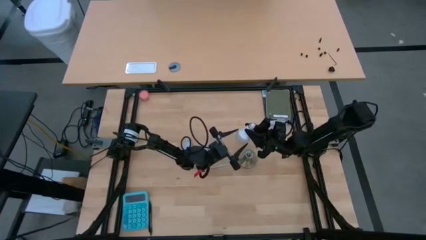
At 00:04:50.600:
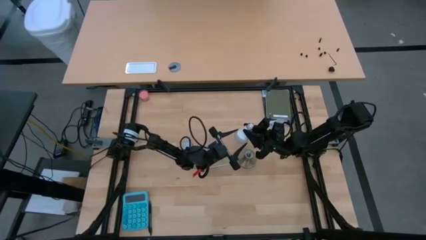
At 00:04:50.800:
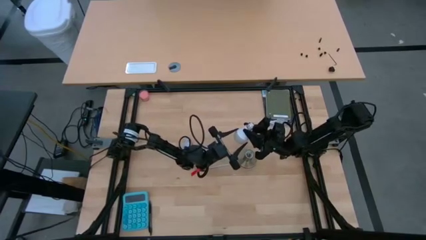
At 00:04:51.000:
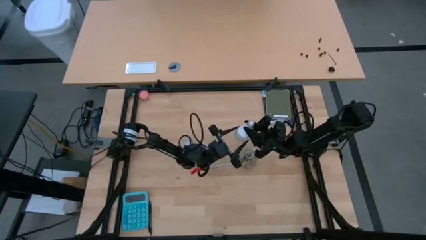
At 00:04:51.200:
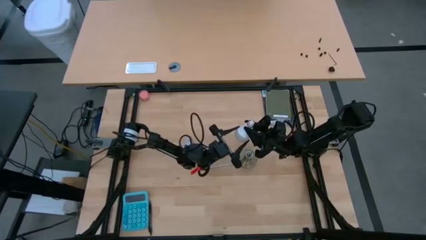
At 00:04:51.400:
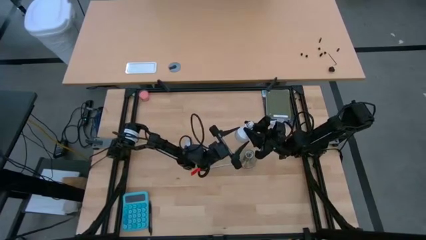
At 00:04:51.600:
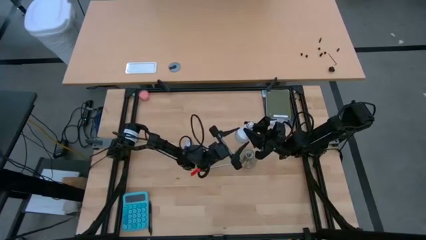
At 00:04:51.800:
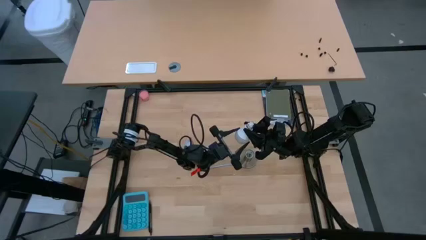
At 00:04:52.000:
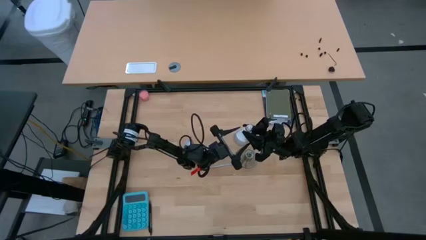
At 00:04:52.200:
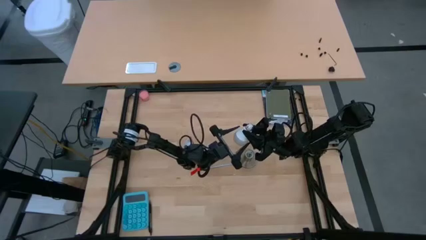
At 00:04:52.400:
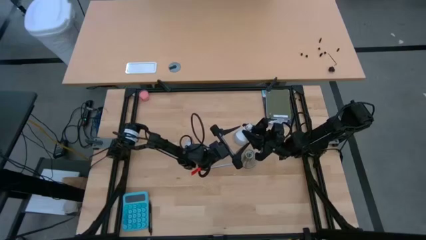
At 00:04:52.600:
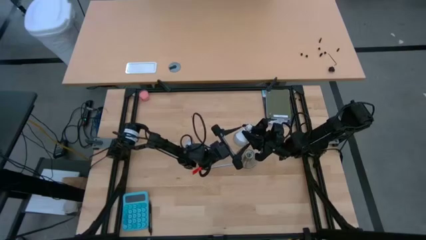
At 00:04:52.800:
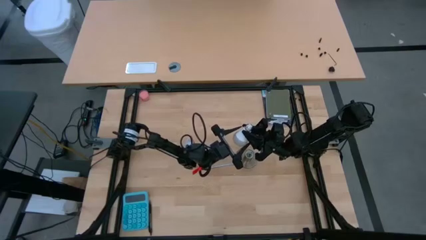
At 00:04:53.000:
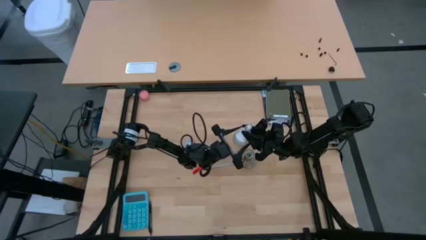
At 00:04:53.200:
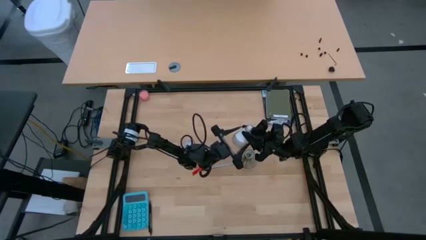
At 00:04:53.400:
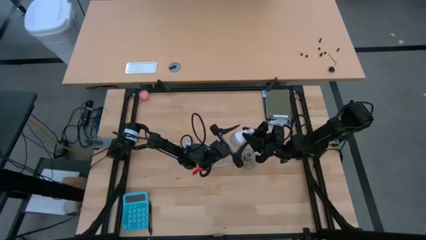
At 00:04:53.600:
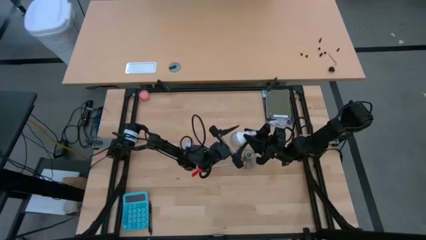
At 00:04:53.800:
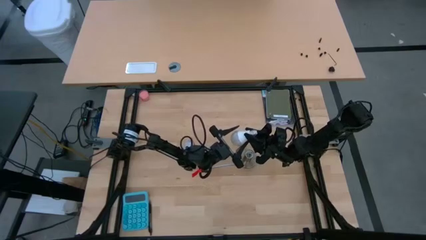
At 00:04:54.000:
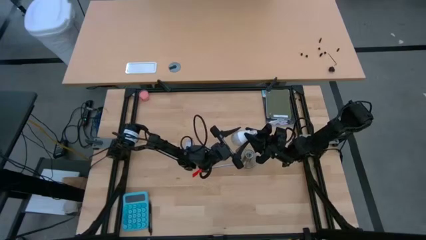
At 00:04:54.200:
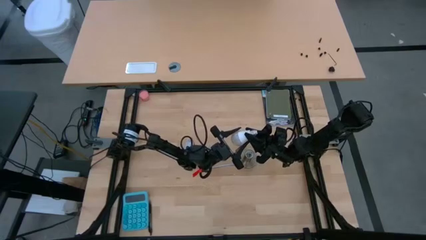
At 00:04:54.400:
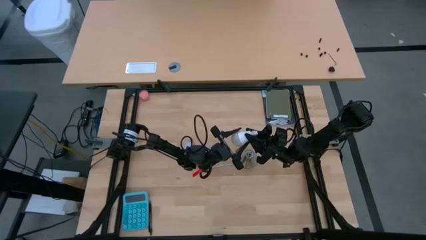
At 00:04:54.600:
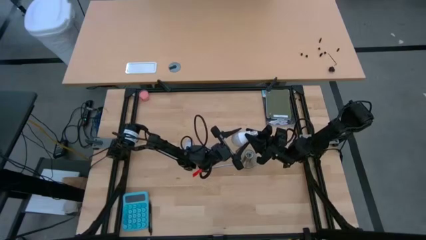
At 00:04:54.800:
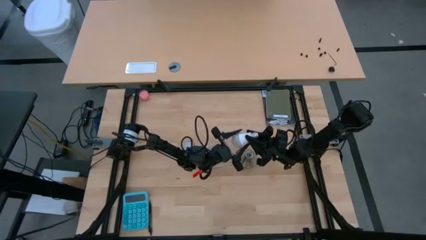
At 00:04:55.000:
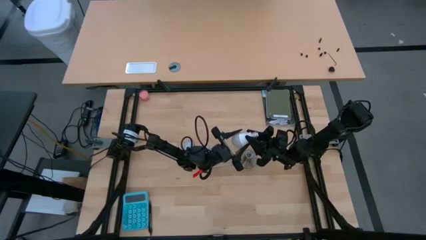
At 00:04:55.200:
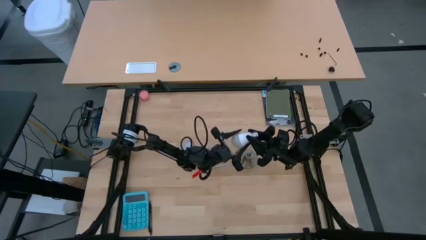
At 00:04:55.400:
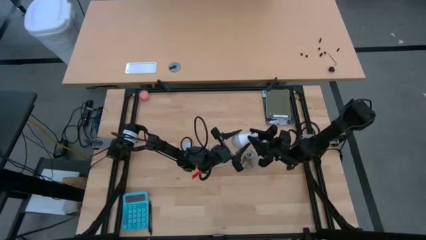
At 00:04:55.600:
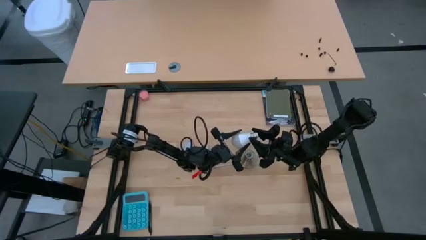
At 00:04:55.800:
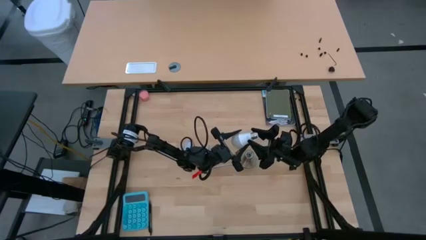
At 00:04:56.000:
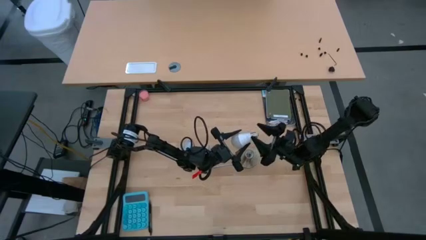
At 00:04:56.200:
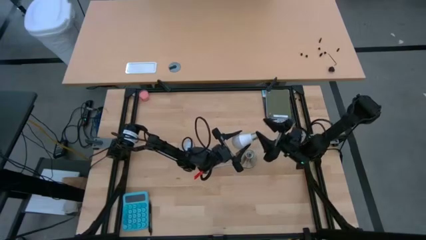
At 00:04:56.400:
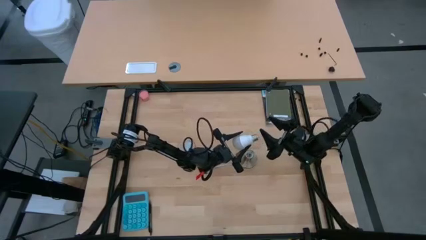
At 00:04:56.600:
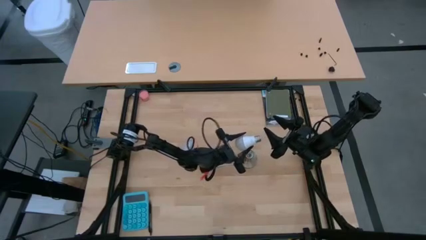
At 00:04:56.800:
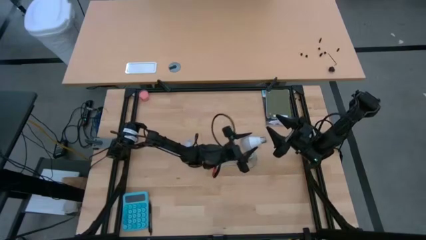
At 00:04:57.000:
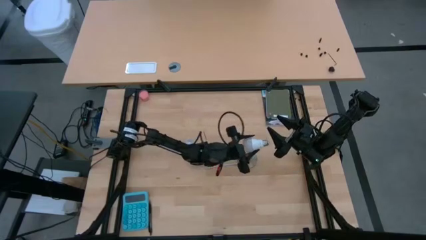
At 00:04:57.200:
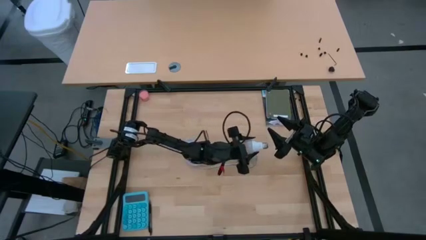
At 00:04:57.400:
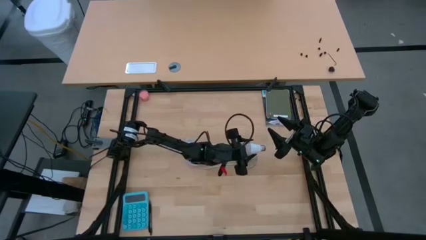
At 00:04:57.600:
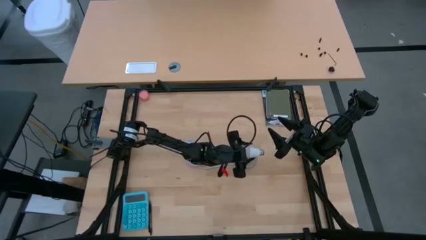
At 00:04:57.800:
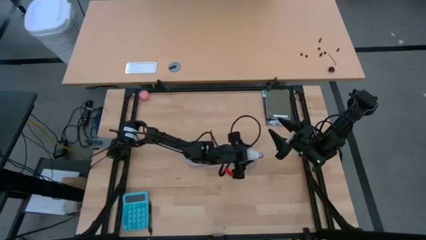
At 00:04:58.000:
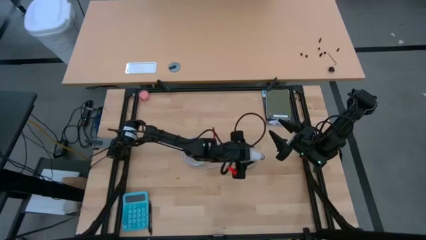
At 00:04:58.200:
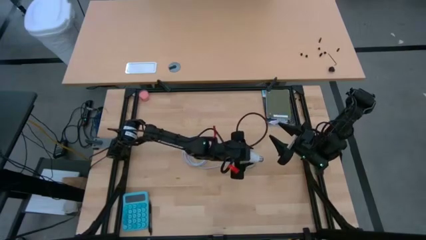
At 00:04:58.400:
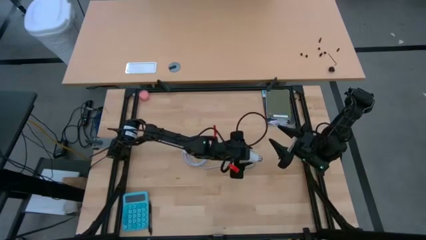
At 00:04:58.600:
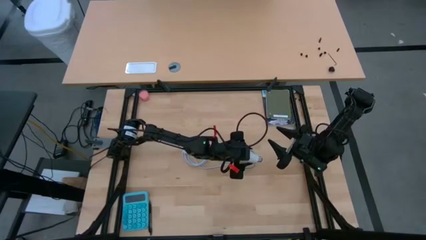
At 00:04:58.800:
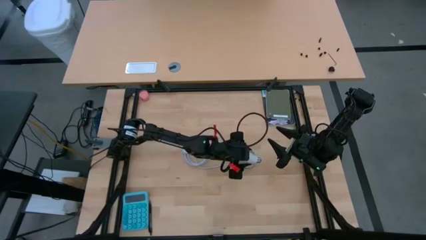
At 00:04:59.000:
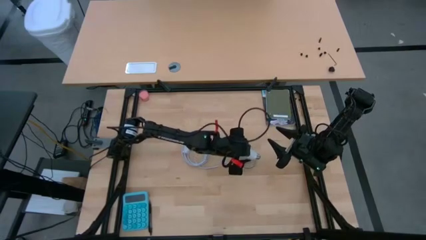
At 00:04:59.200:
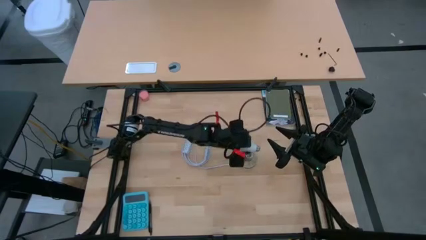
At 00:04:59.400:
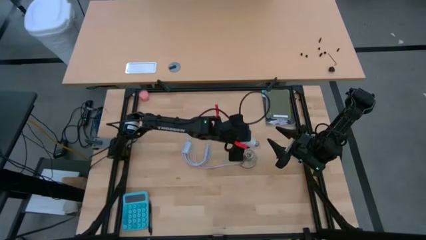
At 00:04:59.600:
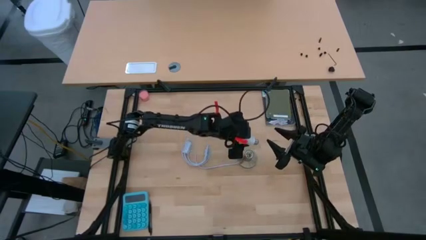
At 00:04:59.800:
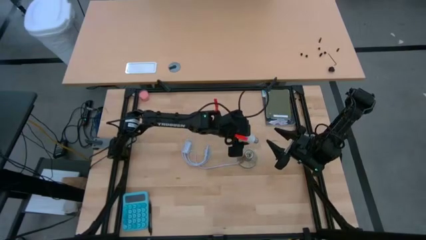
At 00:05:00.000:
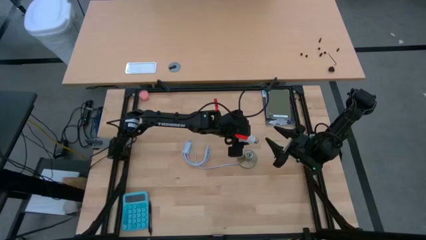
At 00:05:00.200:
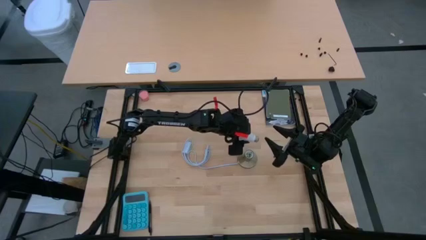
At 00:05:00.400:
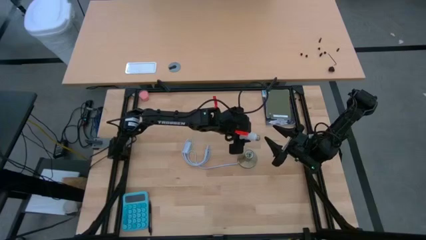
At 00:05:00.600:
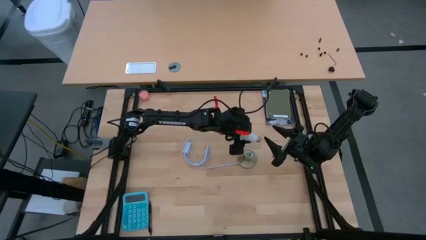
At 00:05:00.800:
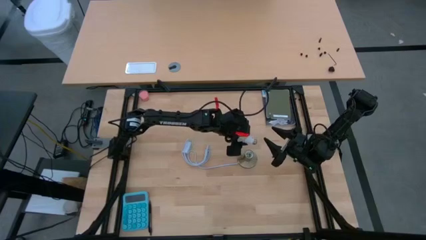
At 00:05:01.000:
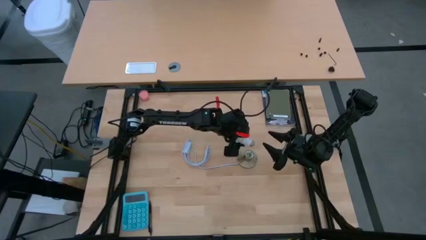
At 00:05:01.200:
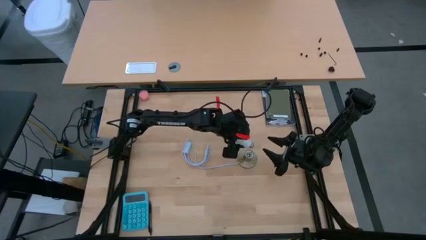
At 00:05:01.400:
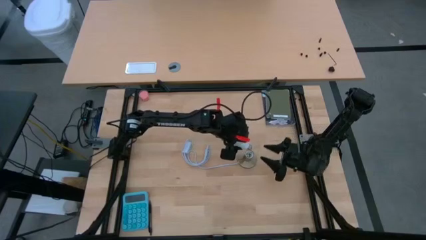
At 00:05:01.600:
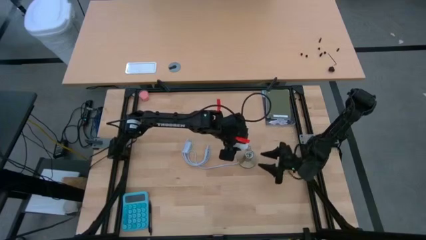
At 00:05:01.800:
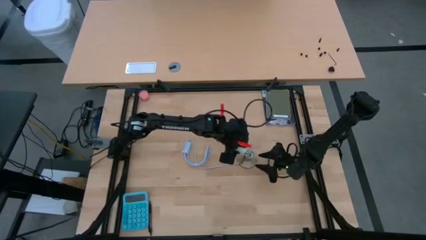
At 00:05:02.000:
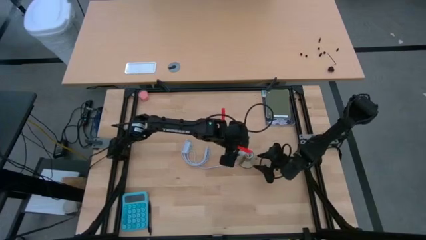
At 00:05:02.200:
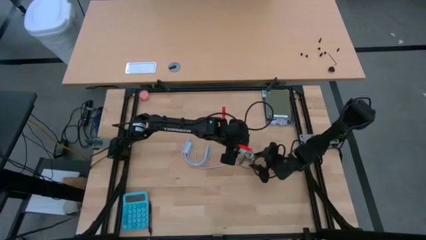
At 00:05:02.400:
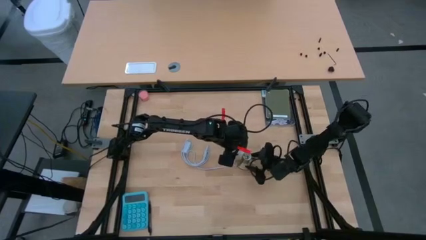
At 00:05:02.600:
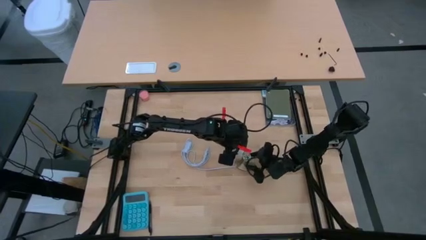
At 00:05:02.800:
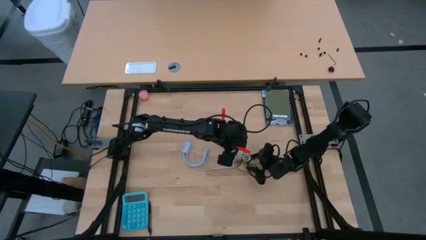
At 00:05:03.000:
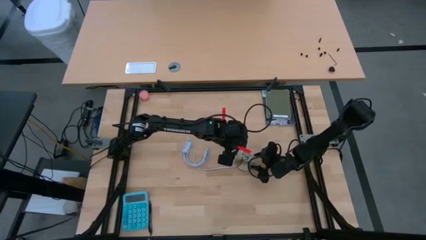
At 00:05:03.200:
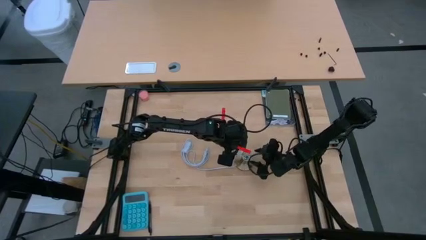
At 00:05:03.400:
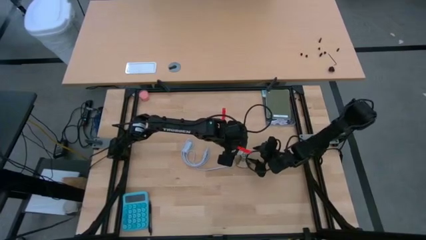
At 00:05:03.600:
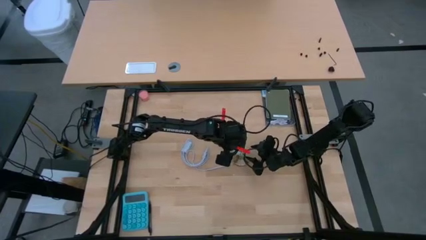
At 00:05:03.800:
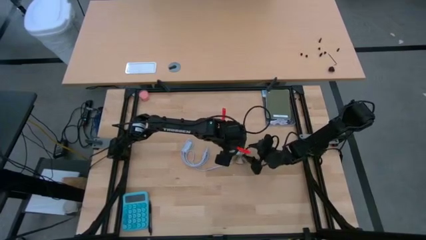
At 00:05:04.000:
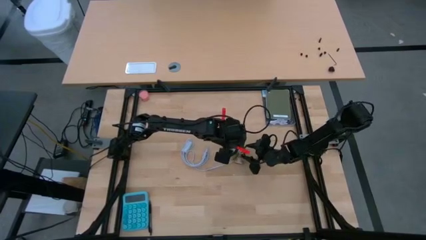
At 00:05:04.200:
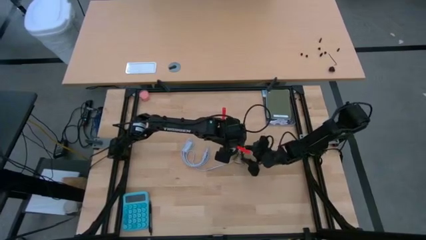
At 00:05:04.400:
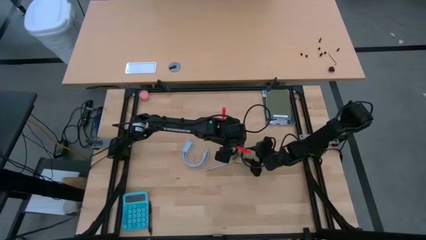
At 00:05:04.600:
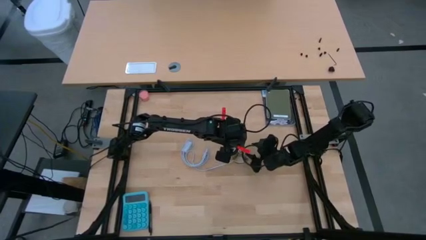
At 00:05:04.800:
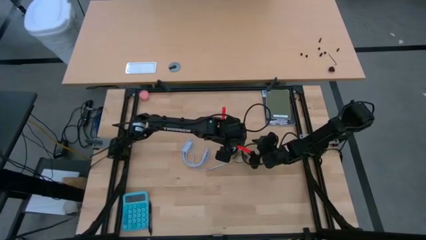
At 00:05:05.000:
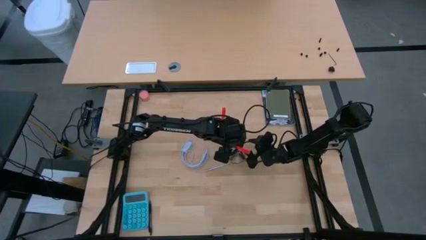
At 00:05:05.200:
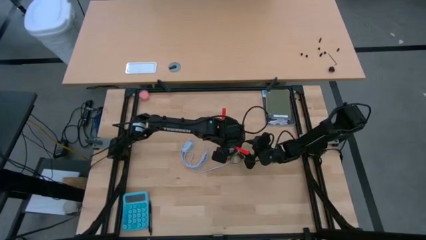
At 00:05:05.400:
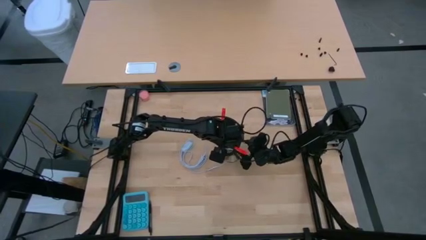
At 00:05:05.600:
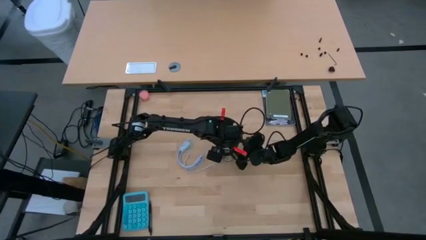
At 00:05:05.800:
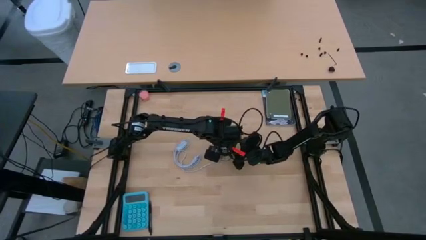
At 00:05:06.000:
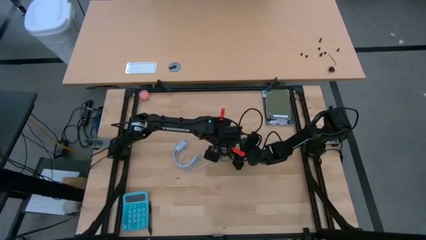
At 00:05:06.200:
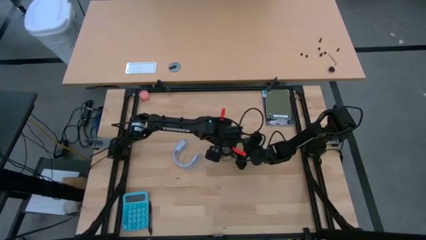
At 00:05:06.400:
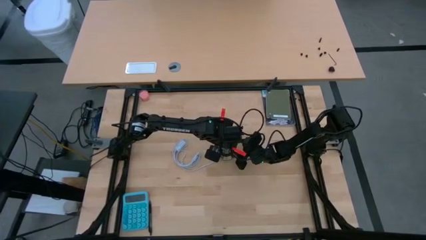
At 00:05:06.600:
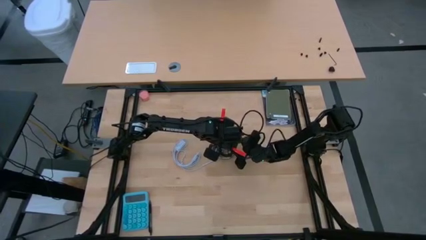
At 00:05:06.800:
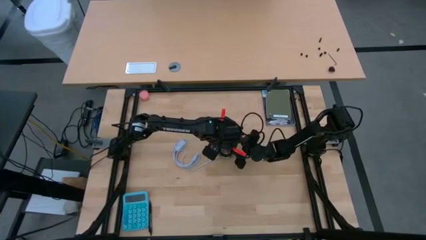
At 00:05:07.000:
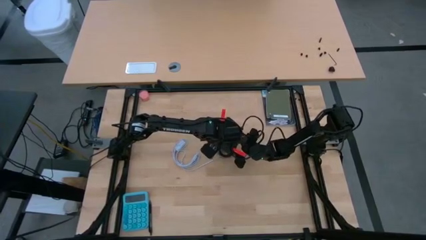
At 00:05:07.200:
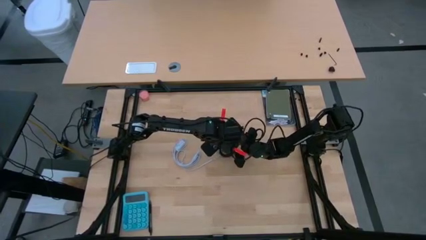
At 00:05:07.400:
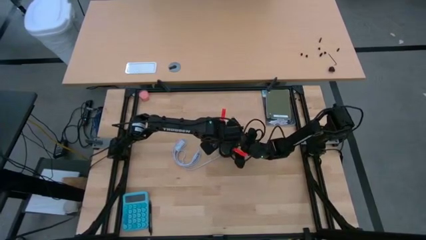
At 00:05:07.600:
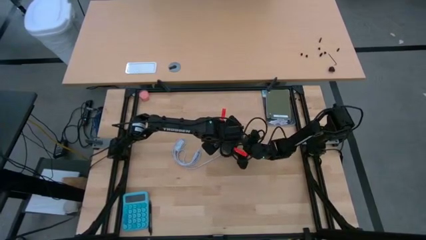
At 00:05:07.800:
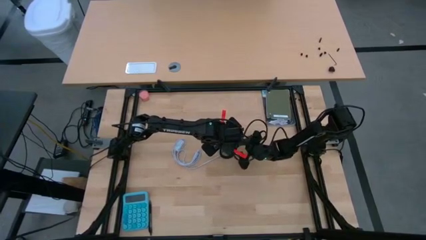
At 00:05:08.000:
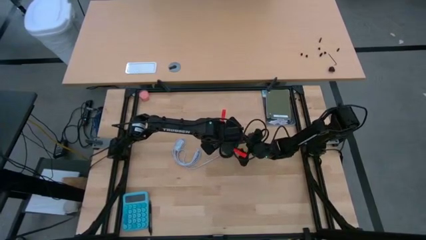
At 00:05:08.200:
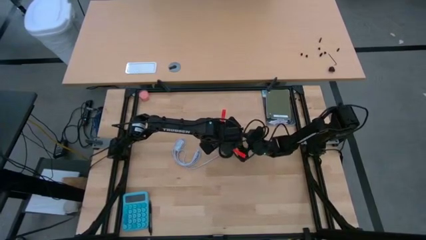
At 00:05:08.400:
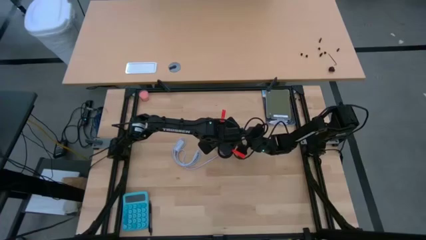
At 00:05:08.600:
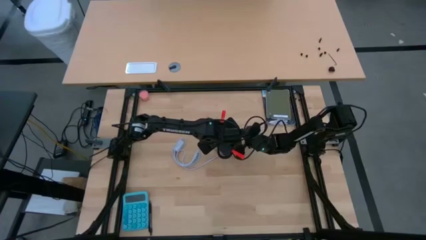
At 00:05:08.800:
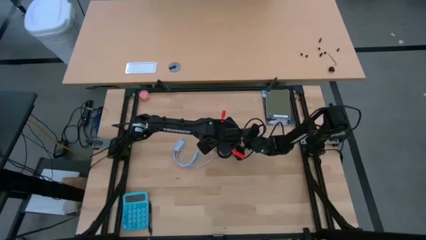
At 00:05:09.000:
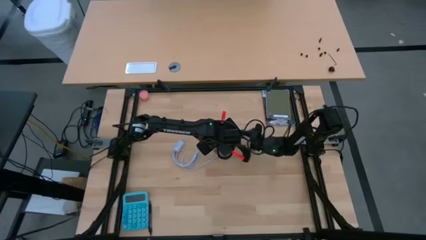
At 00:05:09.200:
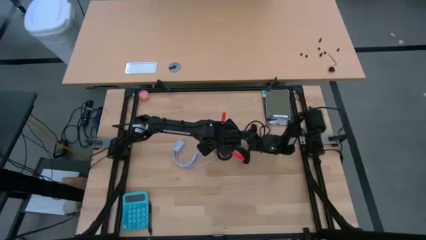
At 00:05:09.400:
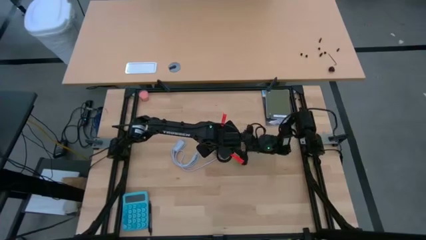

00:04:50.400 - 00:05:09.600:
Task: Screw lightbulb
Insert the lightbulb into the lamp holder
